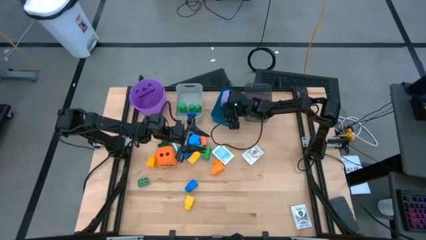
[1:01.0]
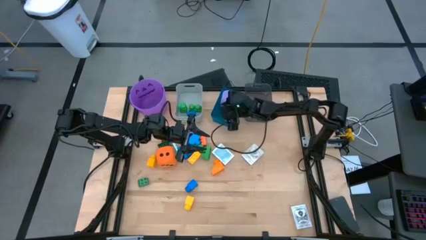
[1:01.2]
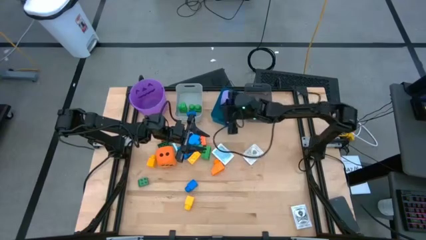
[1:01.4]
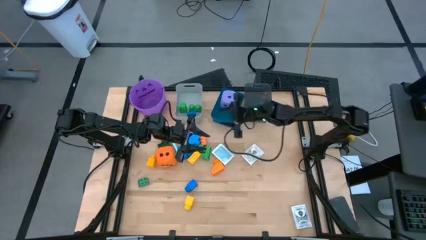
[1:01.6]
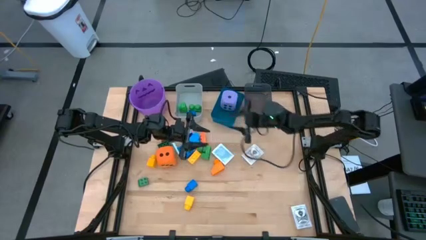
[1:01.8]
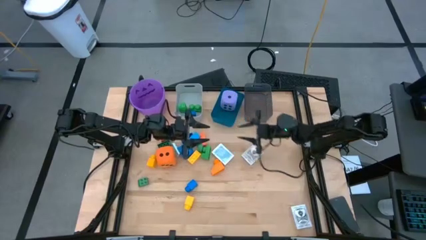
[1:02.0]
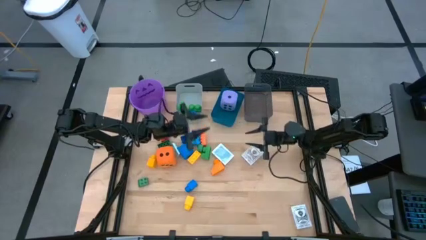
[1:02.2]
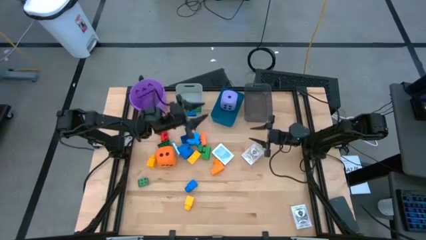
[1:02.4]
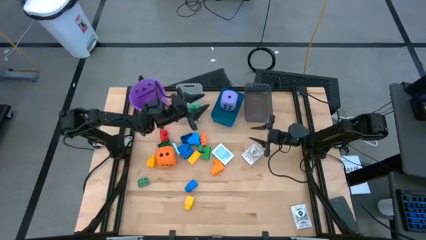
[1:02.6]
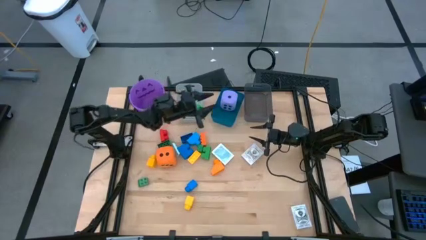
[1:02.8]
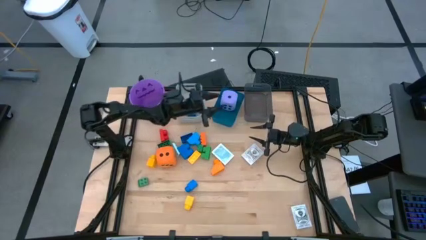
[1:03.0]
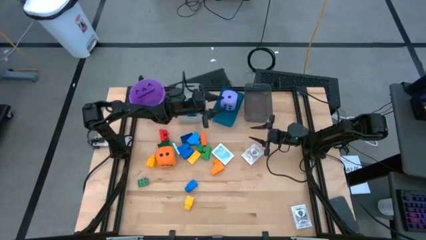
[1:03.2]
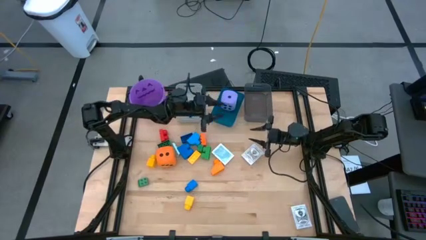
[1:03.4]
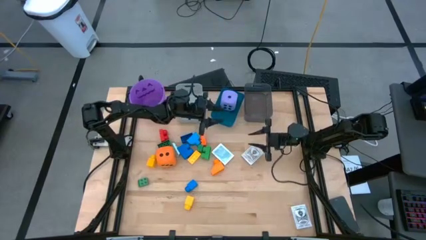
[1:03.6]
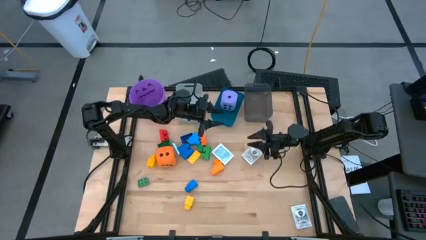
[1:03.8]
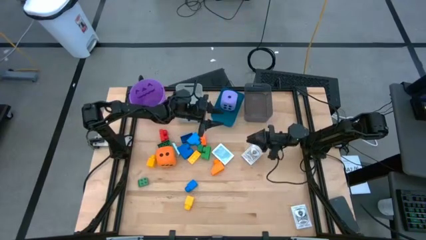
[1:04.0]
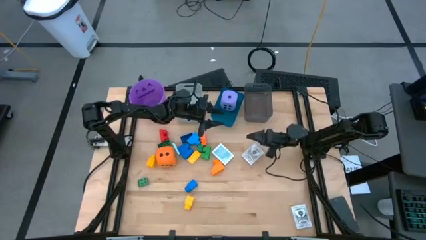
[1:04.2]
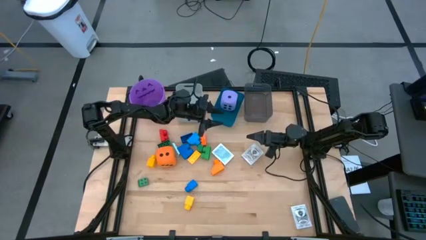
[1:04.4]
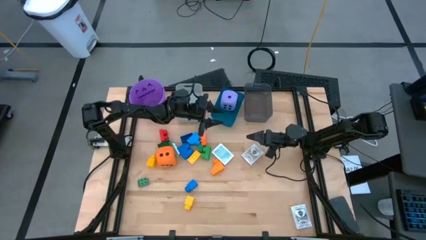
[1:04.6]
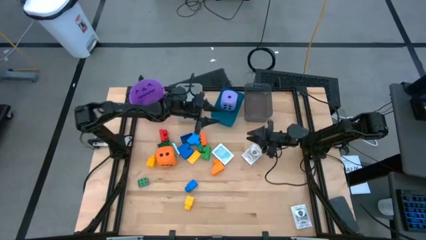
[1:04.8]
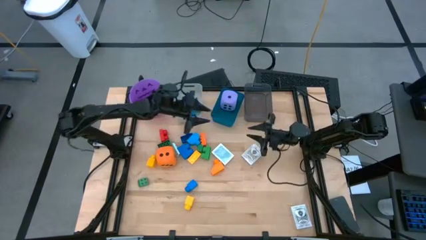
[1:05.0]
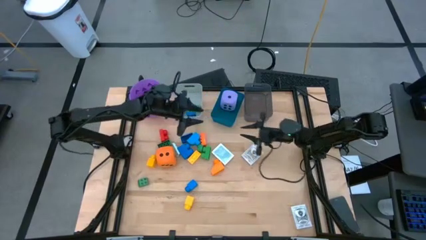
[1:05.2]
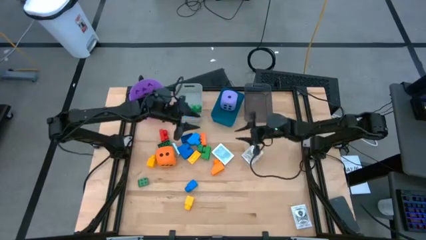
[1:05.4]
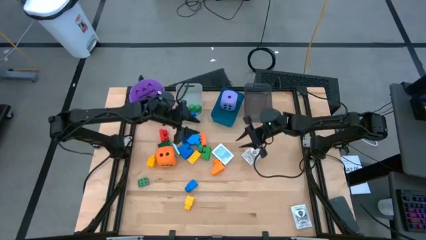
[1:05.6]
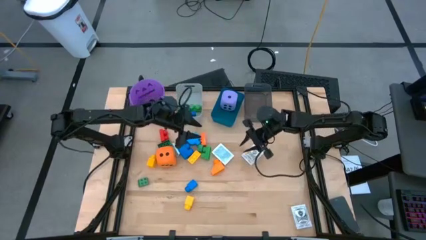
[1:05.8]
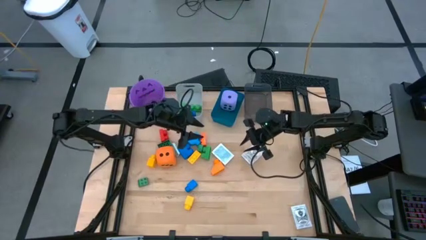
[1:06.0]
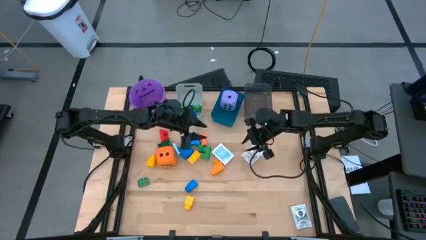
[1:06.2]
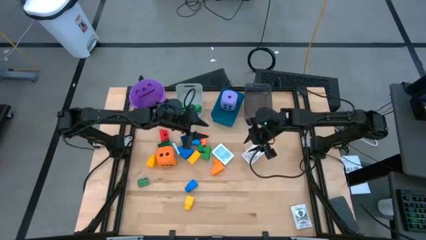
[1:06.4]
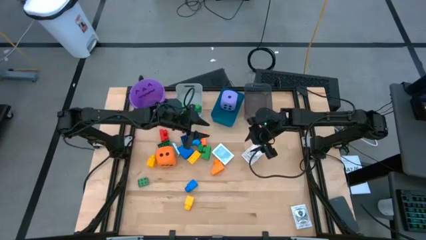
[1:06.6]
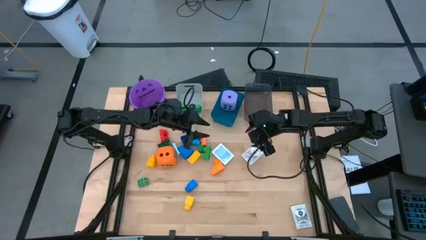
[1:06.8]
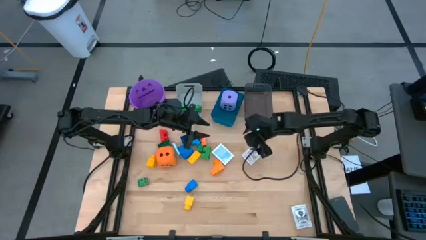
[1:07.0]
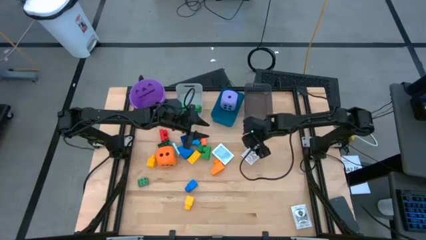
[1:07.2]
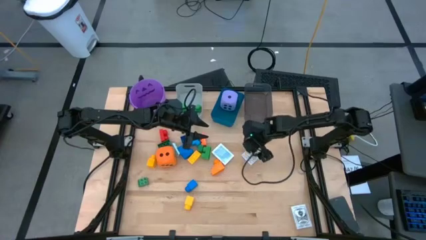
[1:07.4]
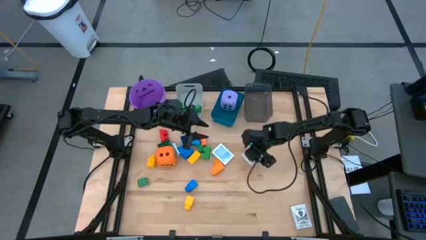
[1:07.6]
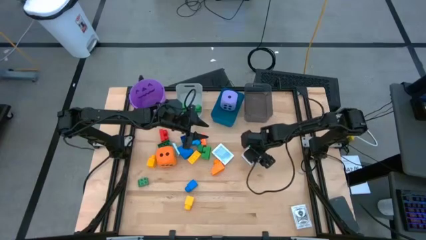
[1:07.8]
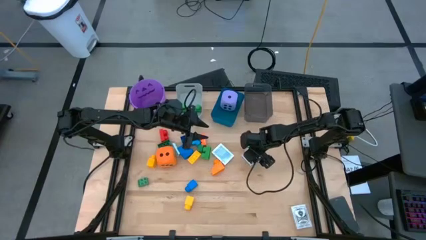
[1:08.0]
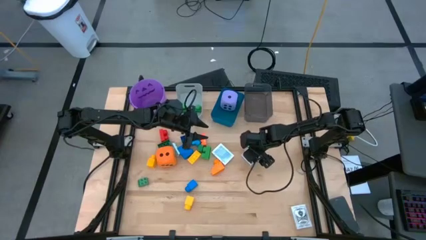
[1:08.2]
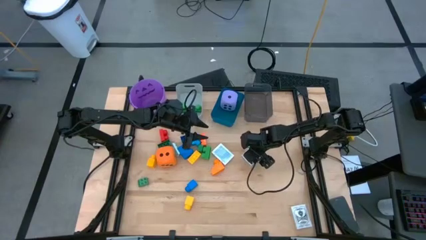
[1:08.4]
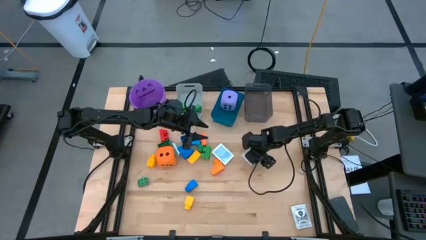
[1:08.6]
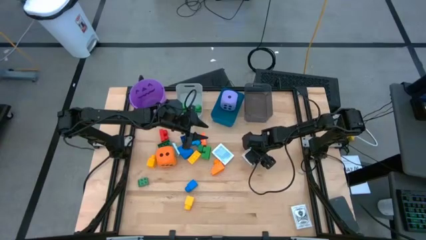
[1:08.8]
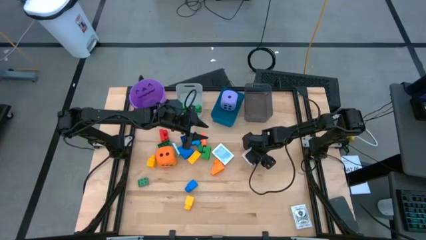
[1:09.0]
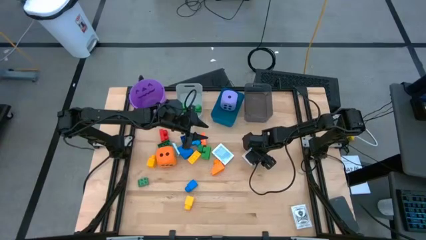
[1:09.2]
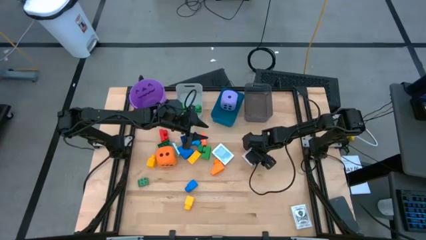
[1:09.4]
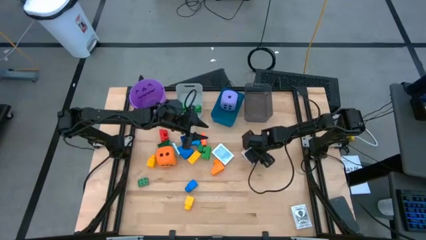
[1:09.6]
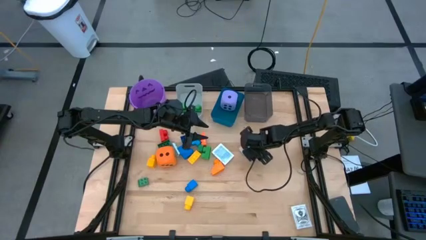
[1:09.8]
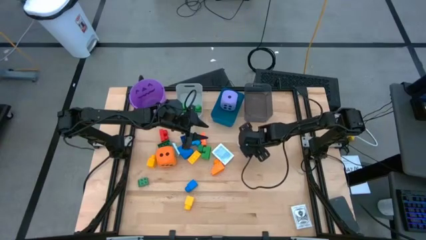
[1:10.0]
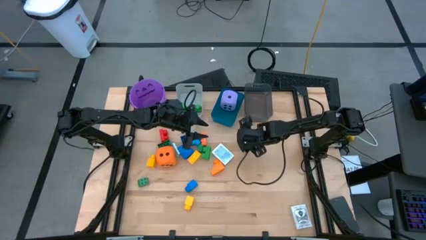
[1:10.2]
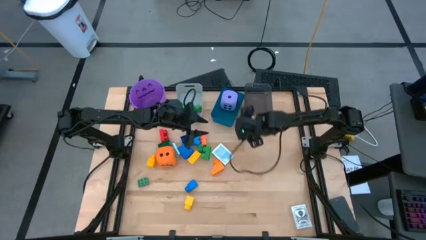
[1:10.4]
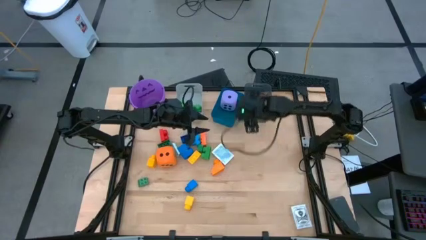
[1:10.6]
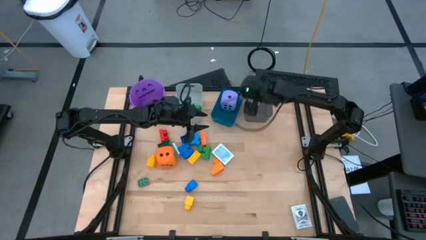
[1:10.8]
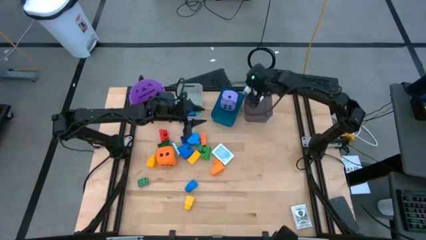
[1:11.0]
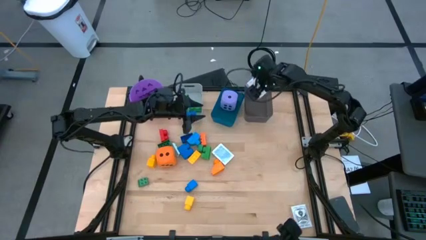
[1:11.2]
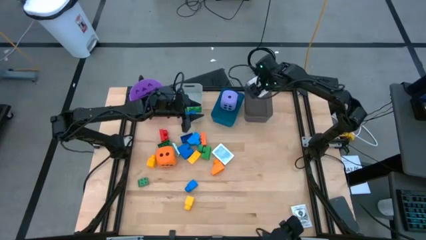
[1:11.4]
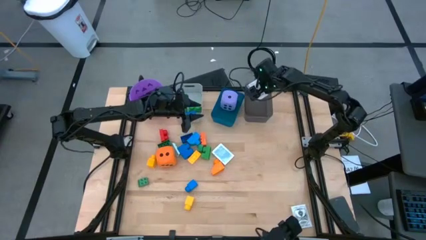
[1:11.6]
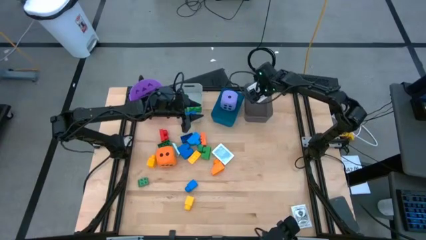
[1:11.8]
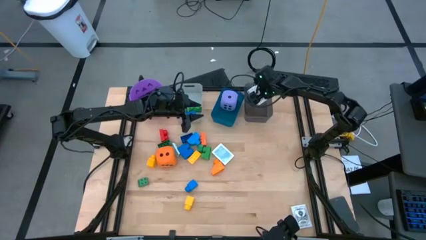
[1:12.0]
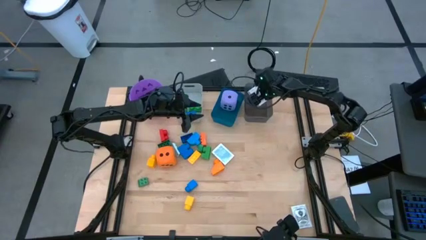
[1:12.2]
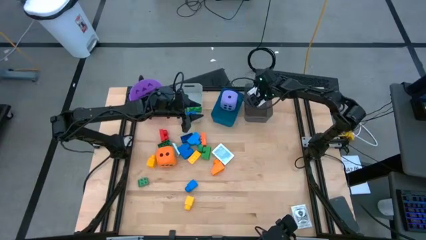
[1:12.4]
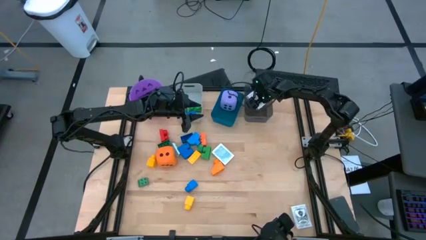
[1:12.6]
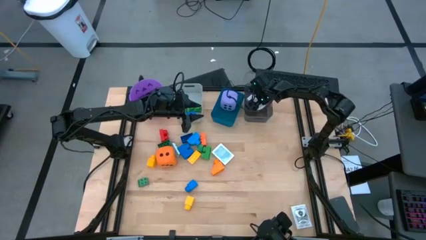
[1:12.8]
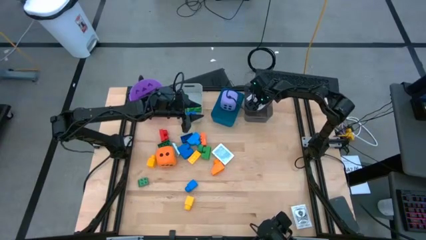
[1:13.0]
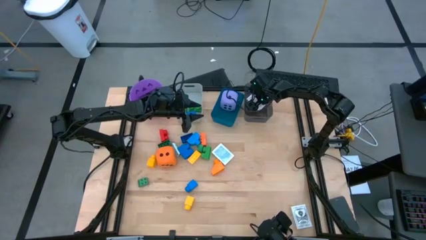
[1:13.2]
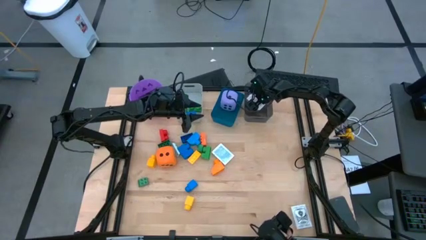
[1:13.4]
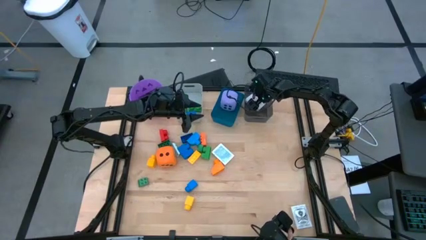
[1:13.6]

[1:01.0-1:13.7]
Task: Pick & Place Toys
Put the gold and white deck of cards into the black bin

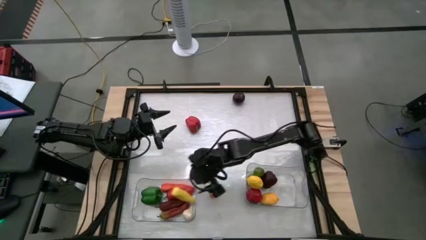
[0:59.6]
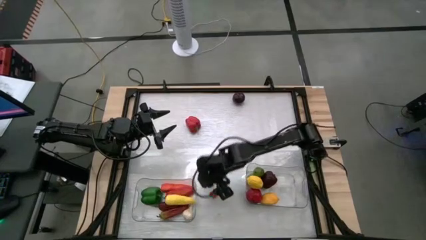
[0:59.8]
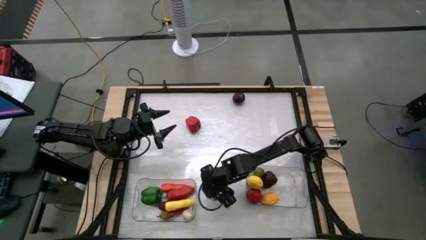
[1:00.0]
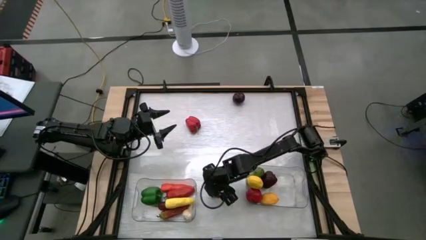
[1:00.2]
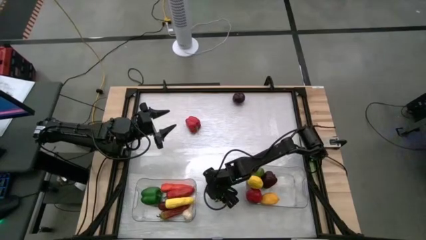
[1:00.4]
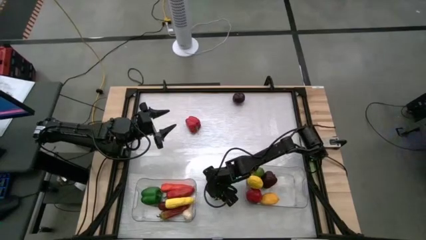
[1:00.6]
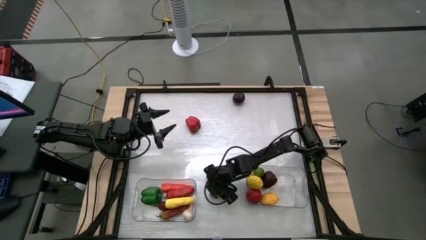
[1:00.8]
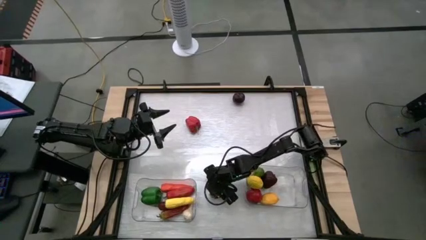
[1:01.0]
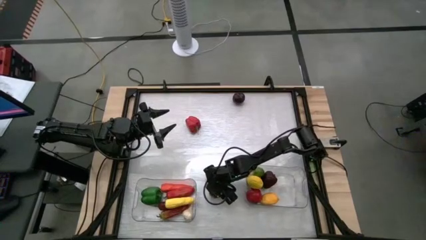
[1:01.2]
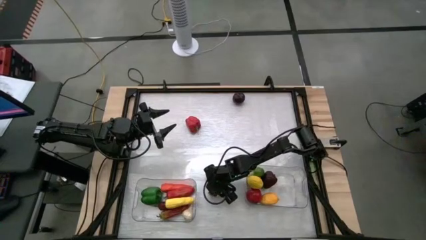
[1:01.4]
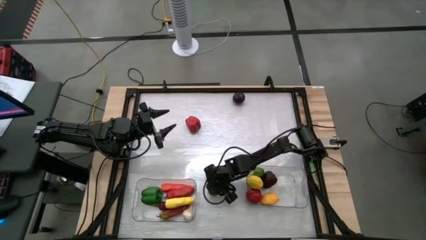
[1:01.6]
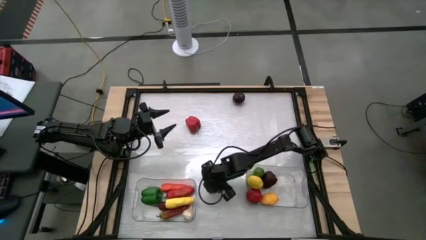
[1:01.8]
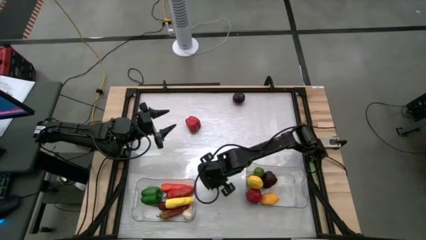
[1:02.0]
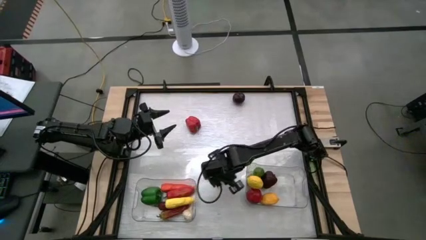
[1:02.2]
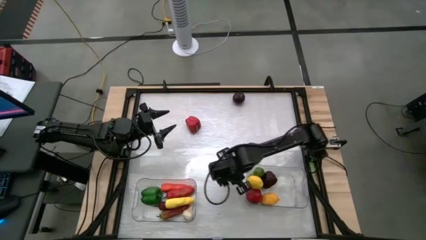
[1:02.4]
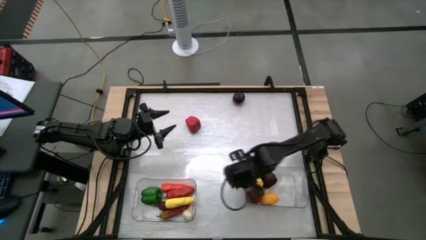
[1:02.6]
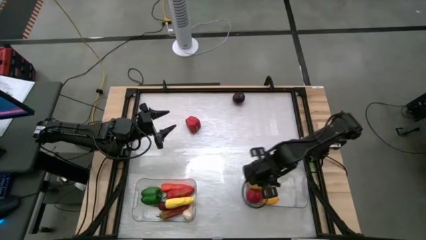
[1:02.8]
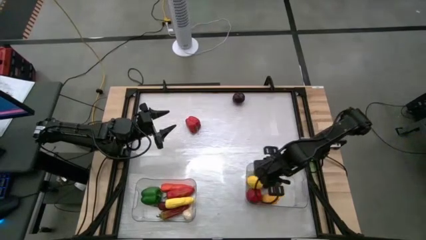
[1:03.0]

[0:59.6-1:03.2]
Task: Sort produce into baskets
Put the orange tomato into the right transparent bin
